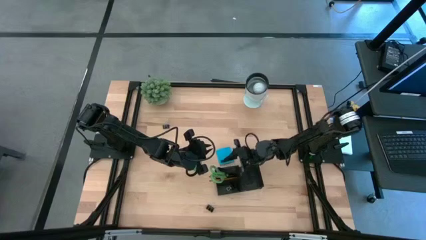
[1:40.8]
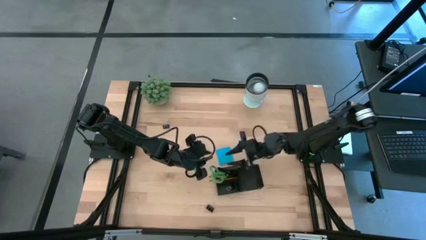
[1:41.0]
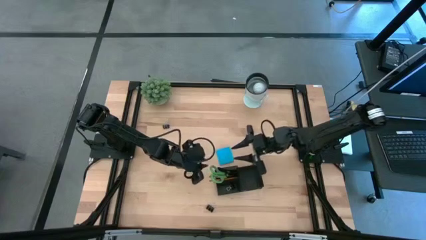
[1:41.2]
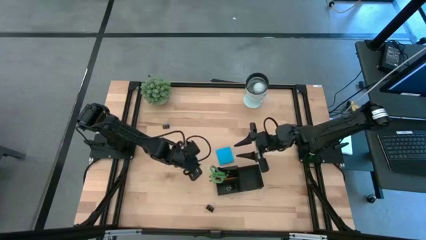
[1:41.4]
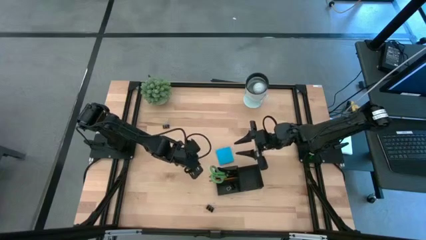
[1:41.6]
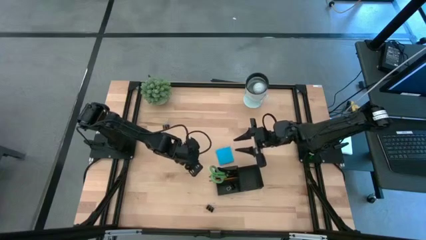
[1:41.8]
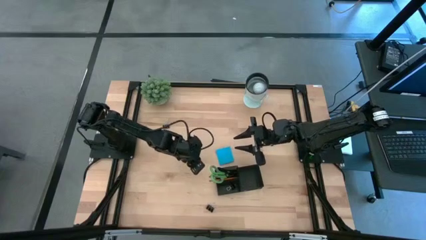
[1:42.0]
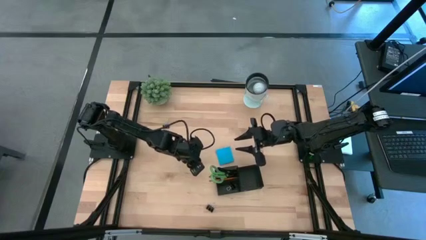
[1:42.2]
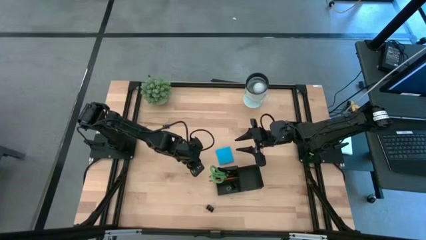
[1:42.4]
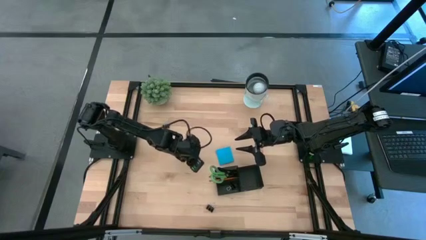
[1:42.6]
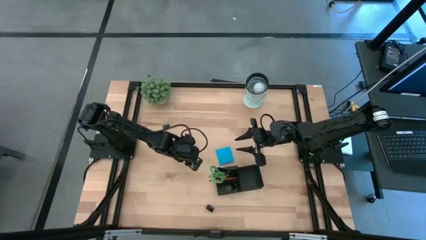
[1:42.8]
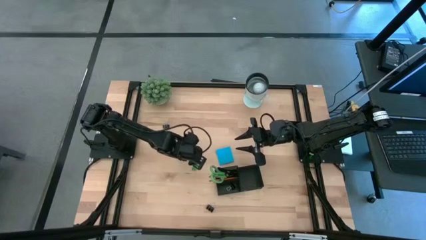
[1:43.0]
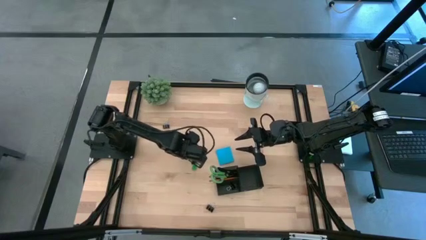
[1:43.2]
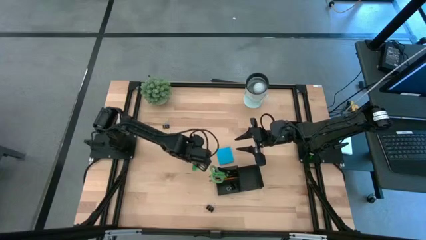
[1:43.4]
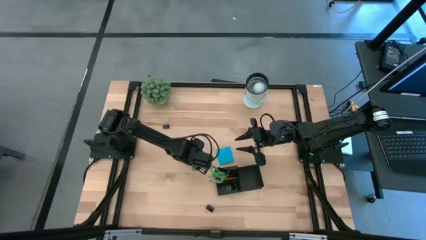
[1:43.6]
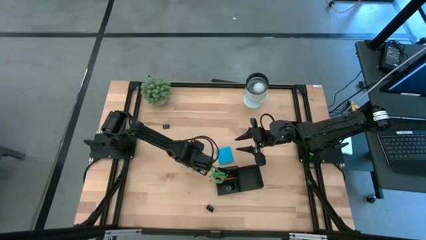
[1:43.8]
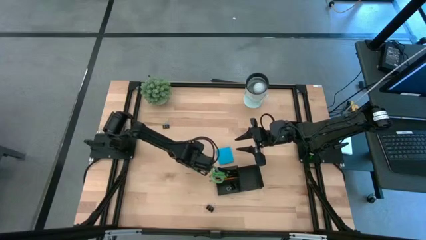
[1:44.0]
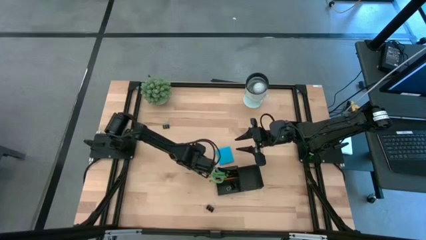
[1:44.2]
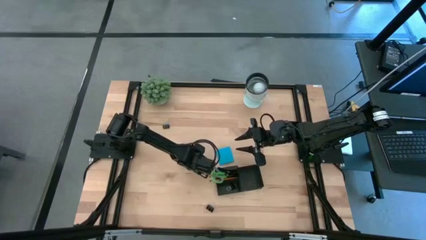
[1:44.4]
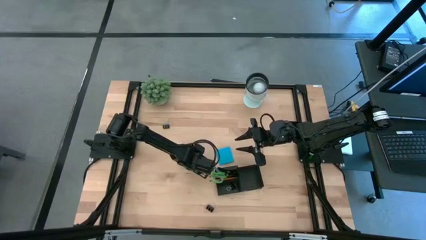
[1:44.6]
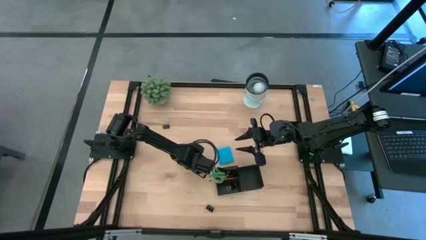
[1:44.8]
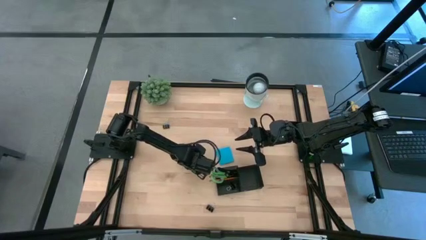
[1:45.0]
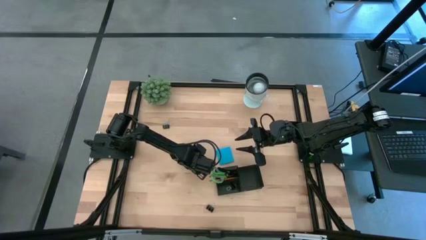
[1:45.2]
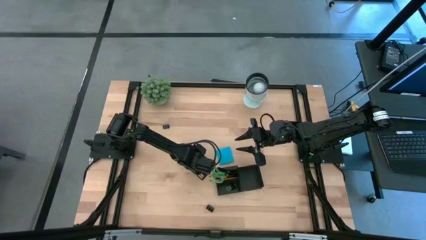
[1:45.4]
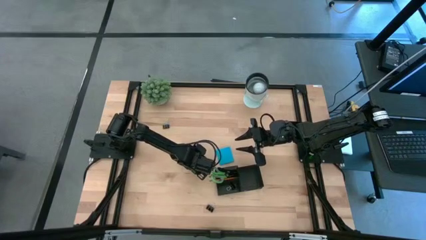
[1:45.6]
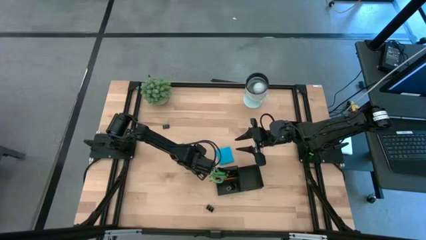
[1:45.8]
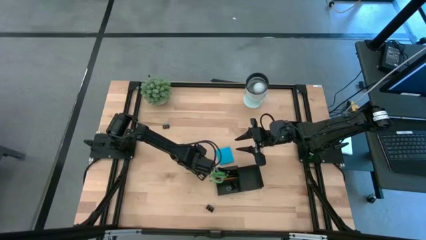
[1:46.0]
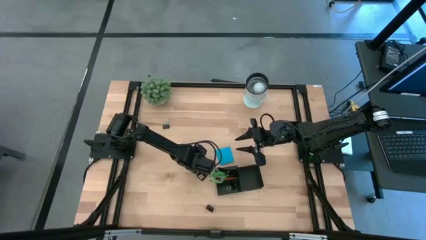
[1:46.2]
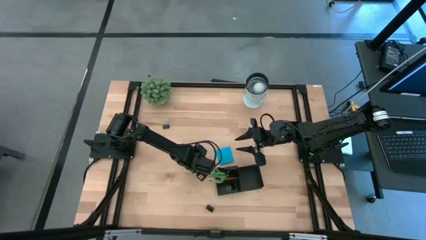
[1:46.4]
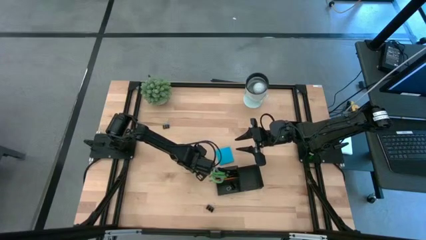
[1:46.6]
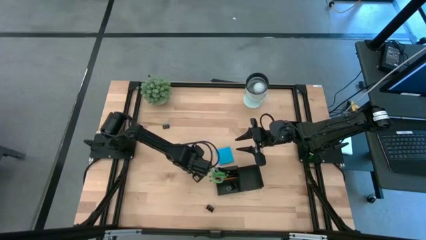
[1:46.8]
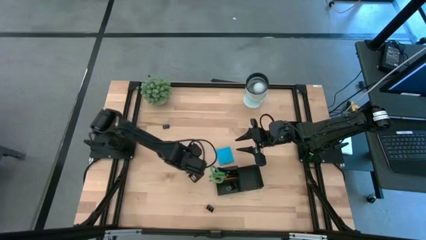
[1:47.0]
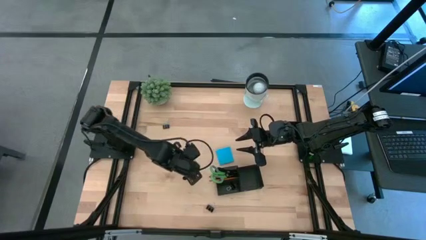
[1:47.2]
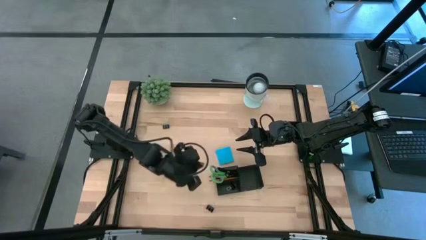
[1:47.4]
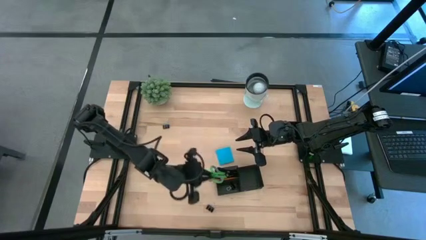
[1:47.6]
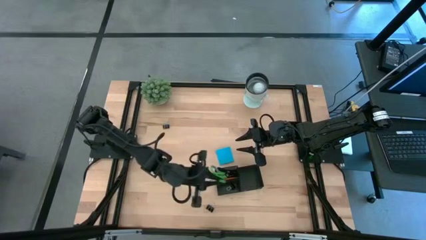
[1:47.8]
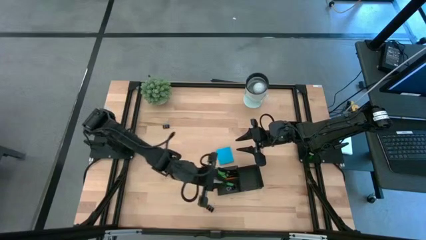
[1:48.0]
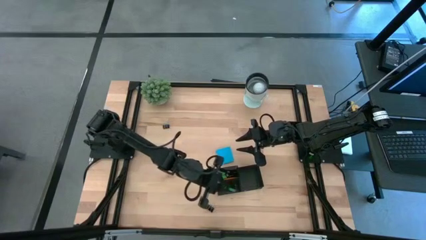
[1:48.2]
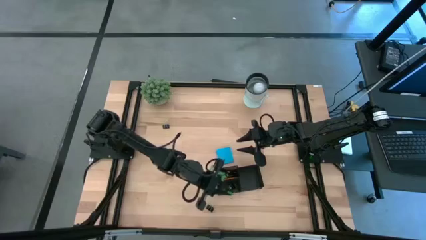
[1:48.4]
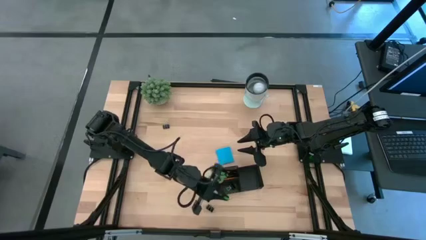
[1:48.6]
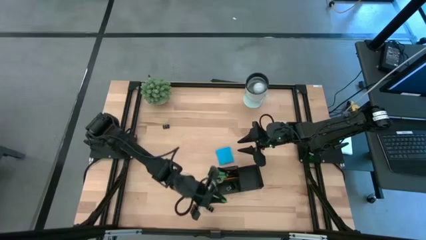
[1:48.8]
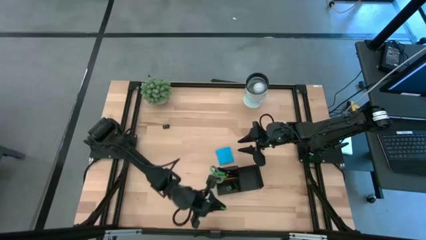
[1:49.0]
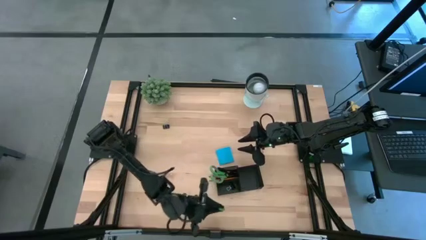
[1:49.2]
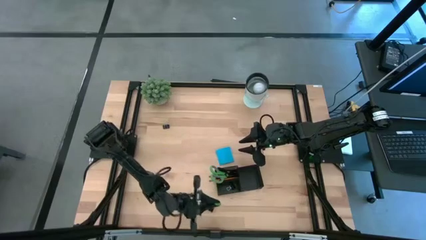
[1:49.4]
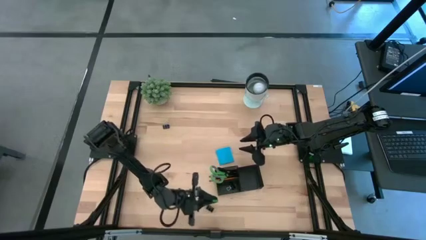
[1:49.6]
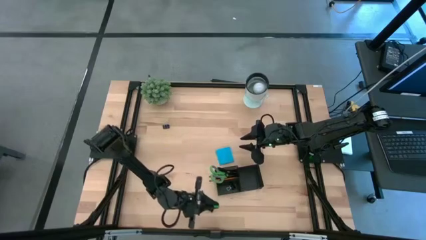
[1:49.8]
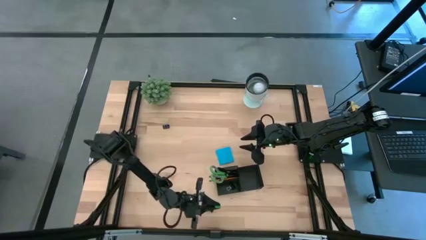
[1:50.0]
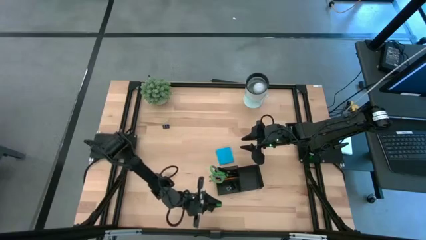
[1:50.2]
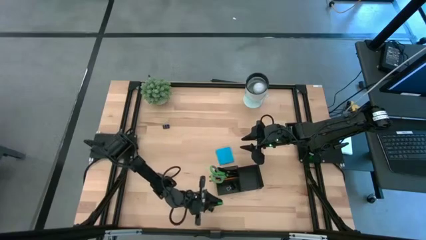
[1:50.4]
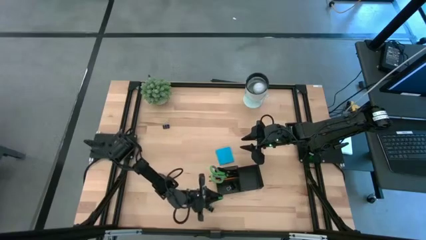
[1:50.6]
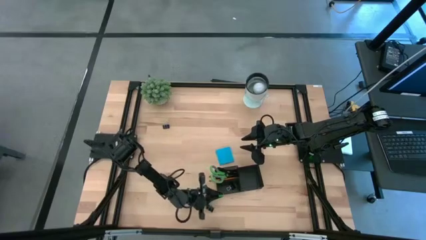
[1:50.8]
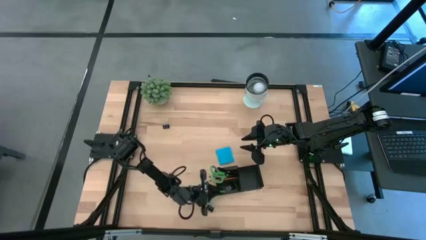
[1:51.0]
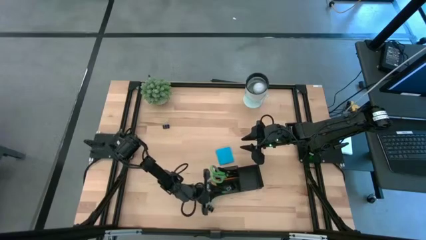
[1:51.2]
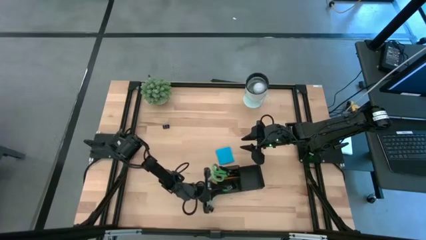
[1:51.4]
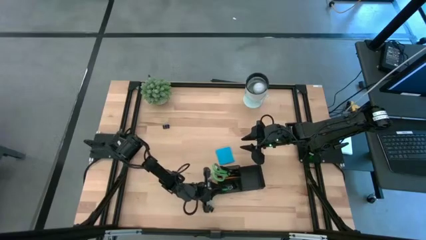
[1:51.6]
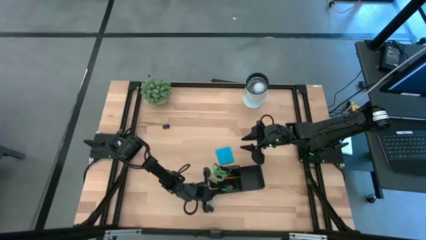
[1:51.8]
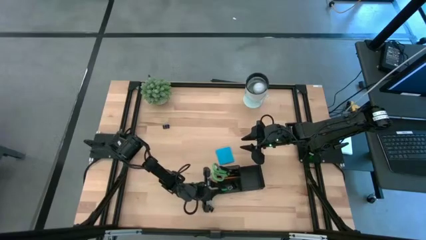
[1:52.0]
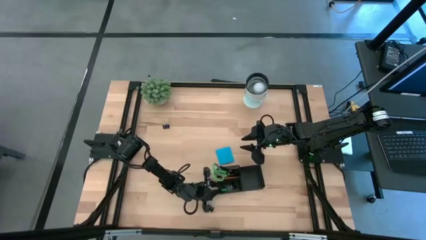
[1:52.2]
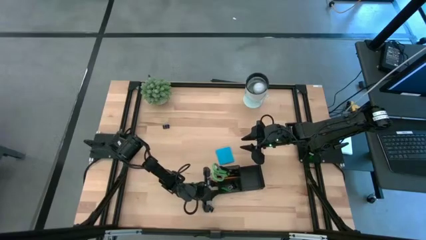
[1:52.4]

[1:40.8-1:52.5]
Task: Pick and place office supplies into organizer
Put the eraser into the bottom left slot of the desk organizer

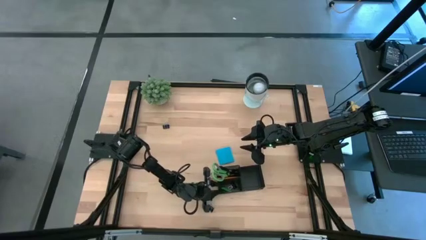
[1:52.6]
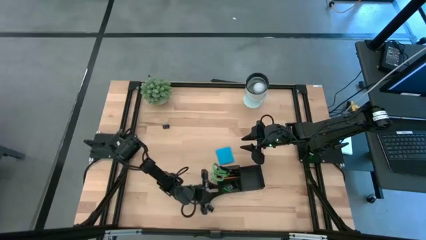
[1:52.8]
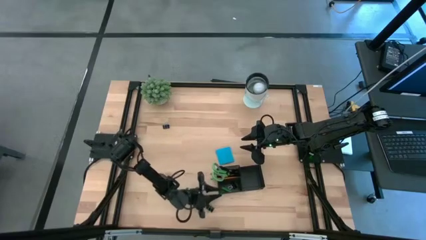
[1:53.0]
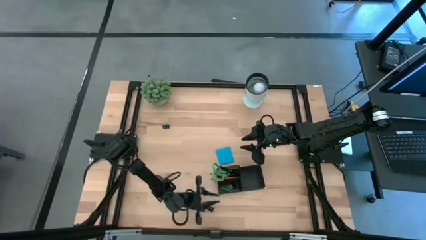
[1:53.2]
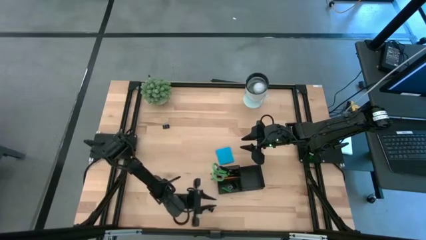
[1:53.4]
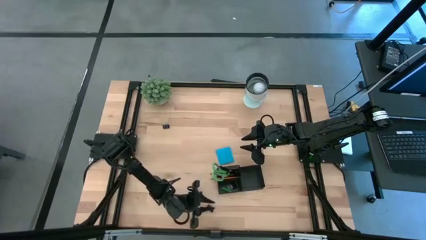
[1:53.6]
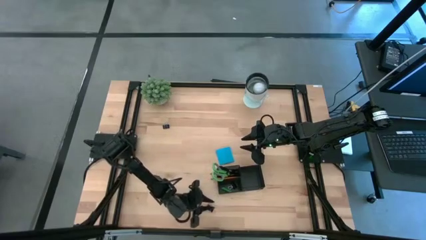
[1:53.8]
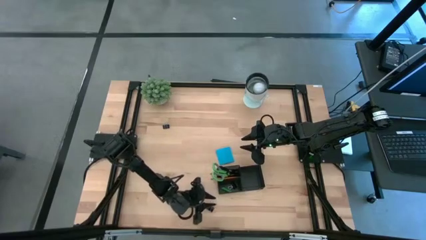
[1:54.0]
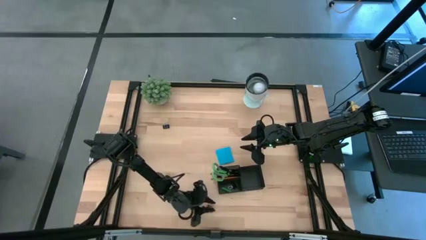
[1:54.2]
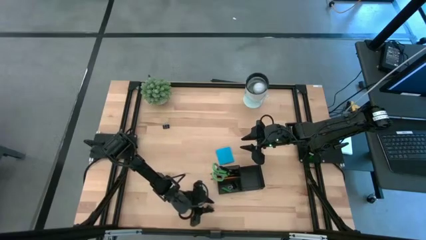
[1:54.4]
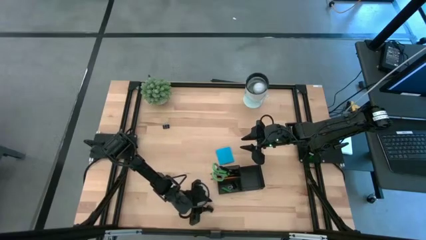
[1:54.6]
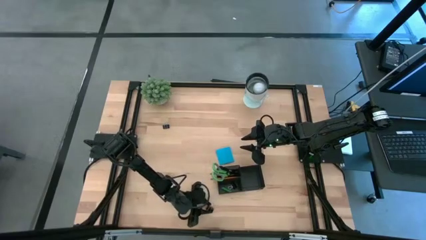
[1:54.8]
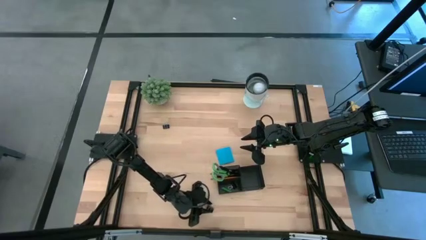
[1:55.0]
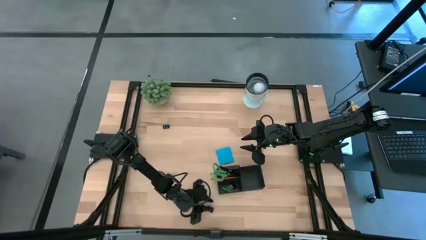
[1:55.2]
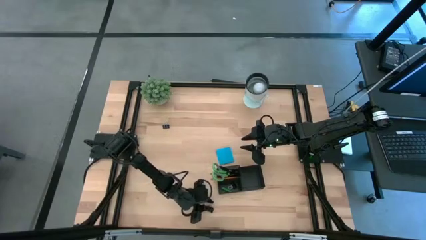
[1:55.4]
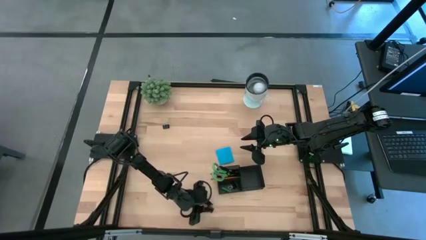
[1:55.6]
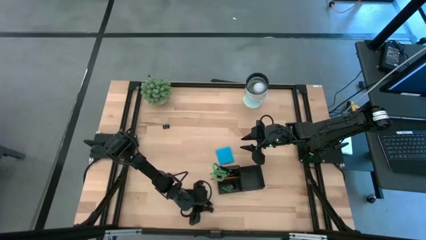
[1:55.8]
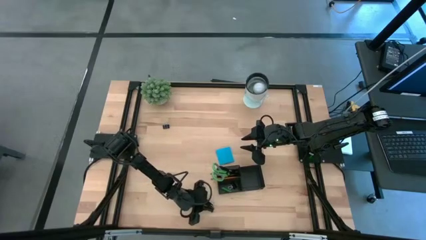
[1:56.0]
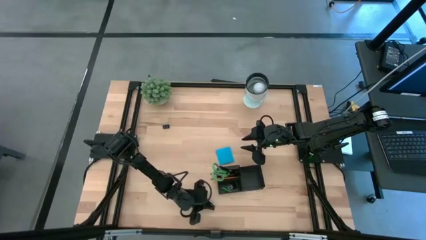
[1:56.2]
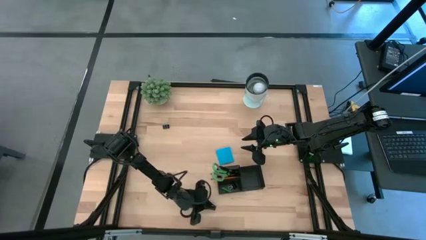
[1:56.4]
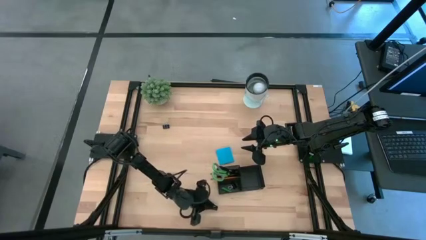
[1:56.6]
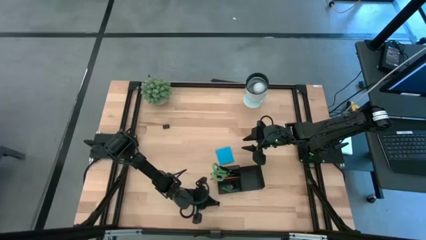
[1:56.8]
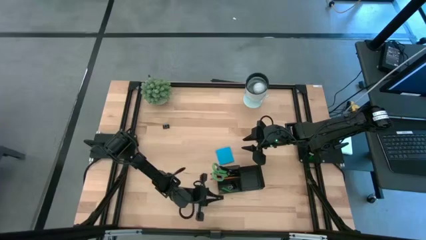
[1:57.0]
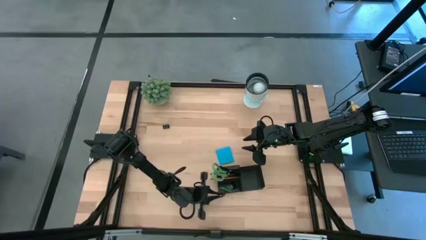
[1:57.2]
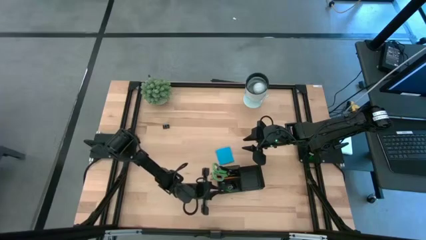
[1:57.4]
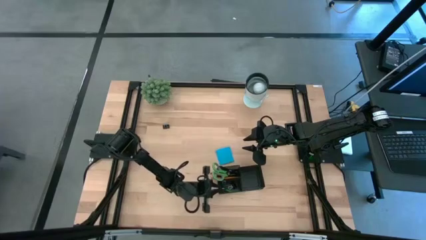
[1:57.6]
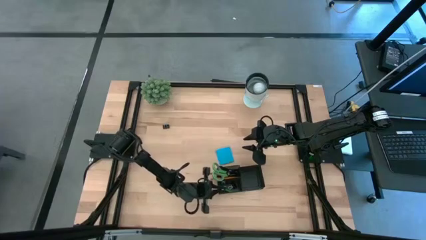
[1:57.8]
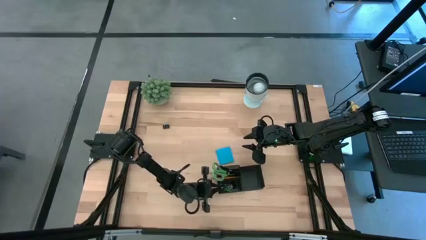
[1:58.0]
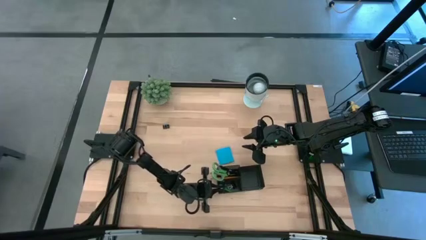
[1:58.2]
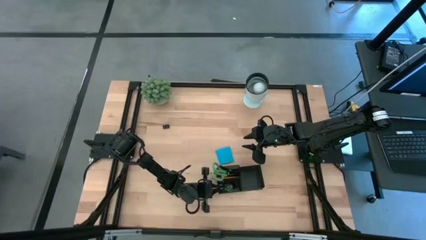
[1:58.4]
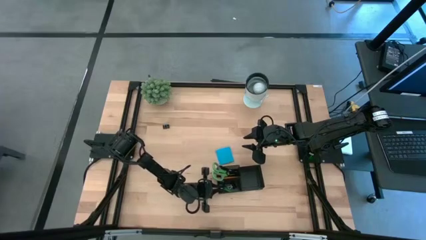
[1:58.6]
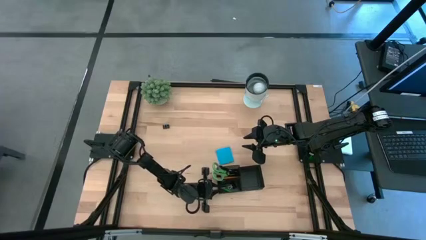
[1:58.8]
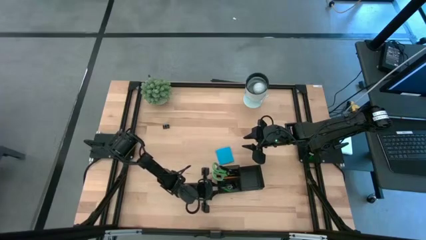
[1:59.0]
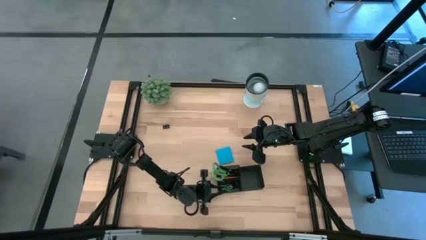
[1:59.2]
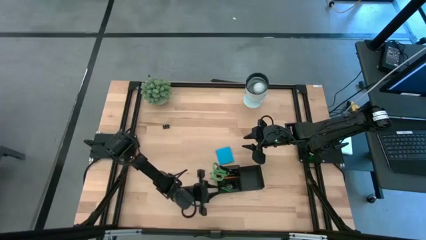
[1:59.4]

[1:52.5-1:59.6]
Put the bottom binder clip into the bottom left slot of the desk organizer
